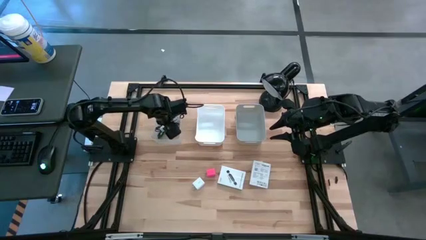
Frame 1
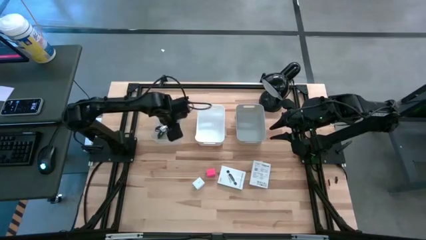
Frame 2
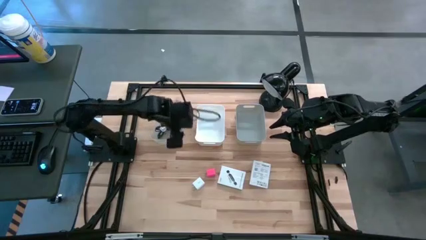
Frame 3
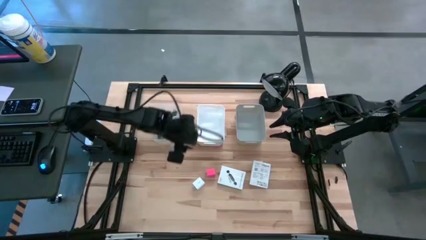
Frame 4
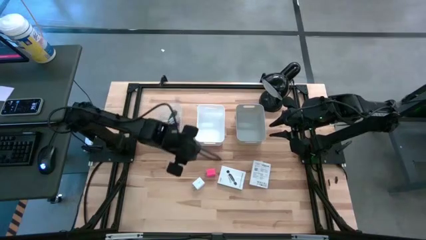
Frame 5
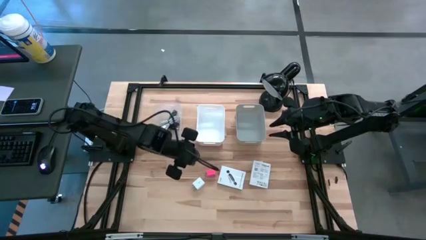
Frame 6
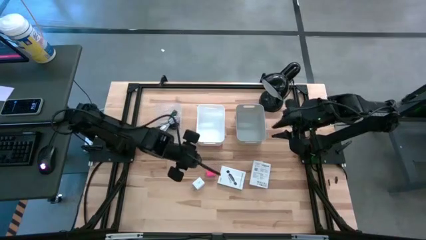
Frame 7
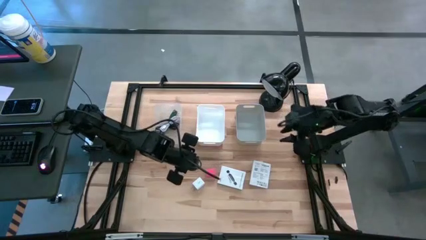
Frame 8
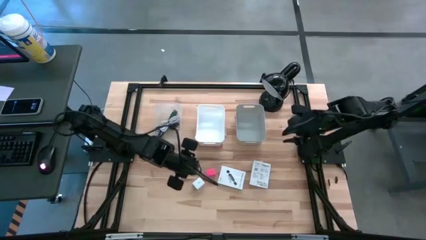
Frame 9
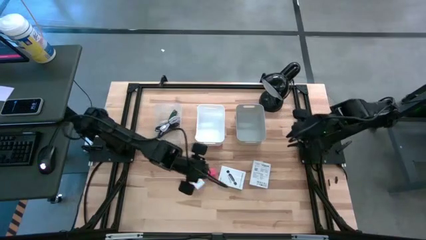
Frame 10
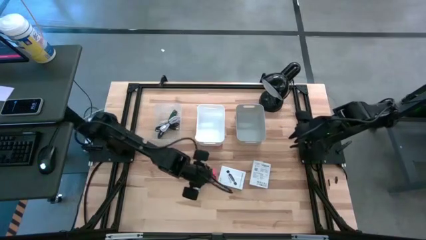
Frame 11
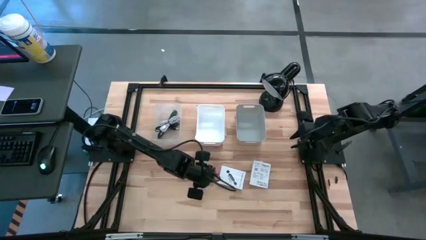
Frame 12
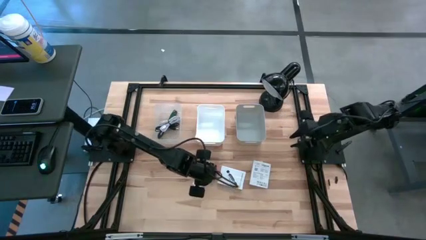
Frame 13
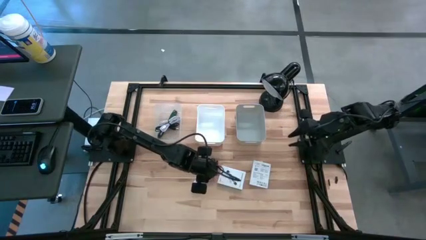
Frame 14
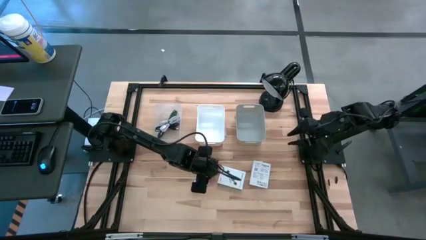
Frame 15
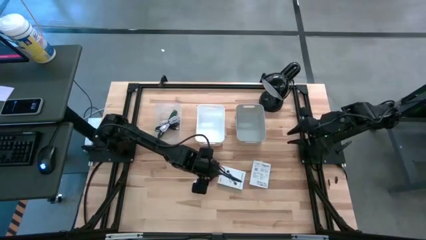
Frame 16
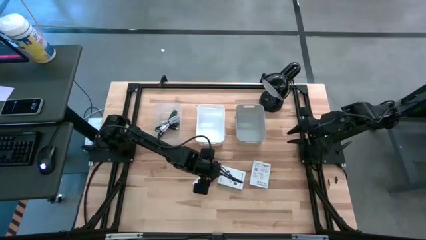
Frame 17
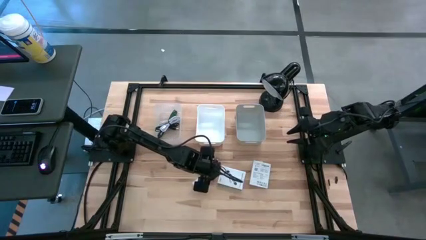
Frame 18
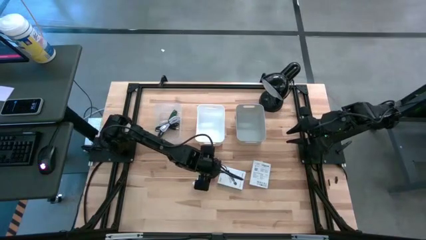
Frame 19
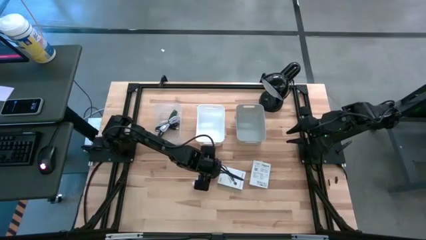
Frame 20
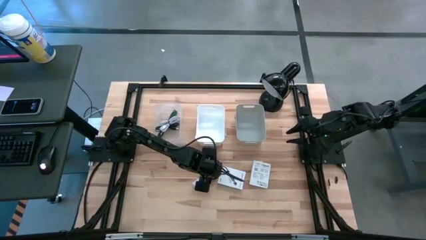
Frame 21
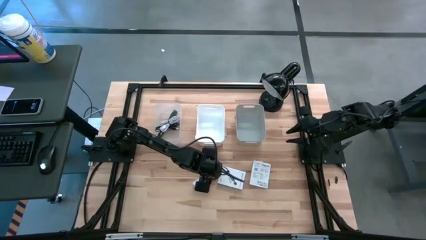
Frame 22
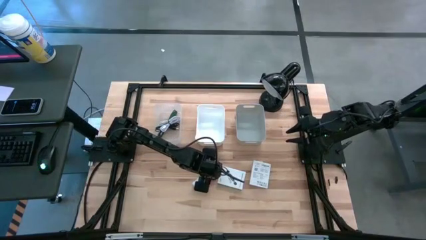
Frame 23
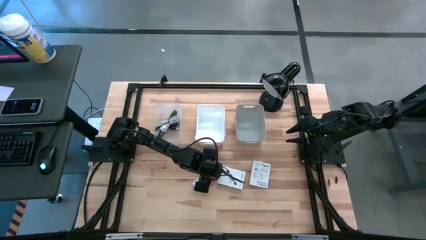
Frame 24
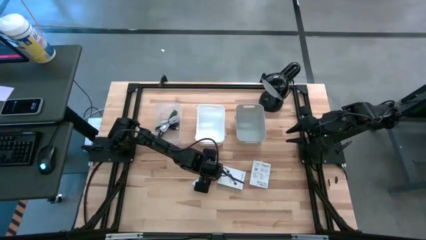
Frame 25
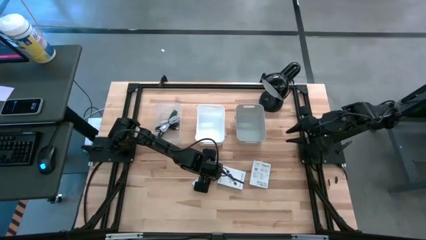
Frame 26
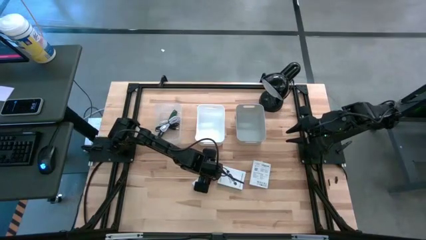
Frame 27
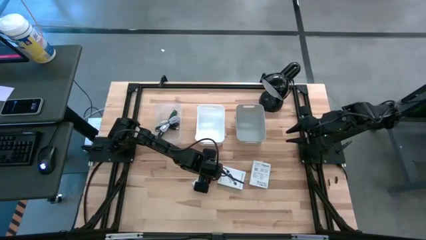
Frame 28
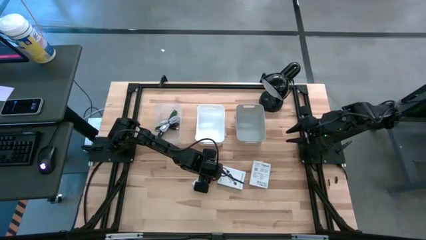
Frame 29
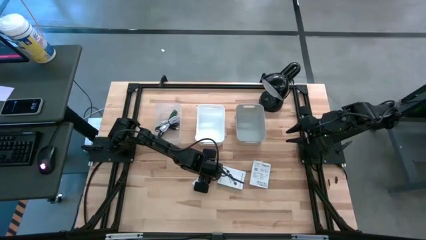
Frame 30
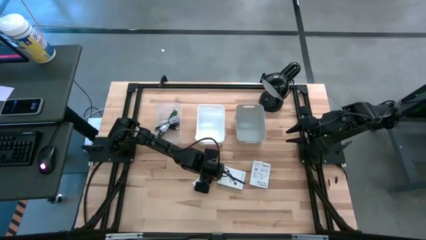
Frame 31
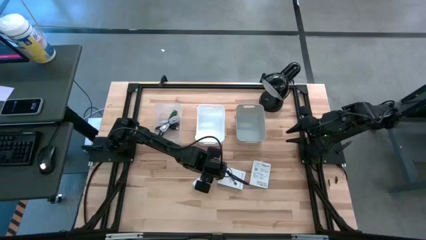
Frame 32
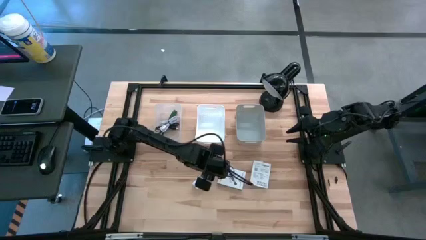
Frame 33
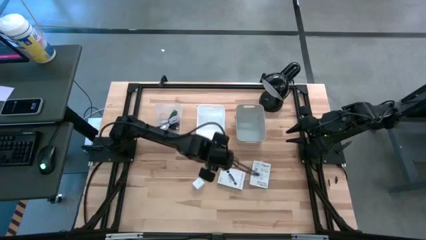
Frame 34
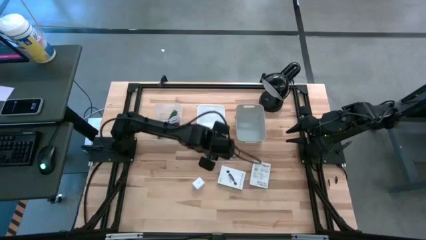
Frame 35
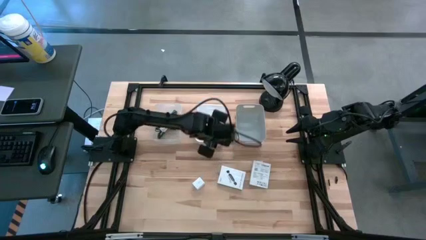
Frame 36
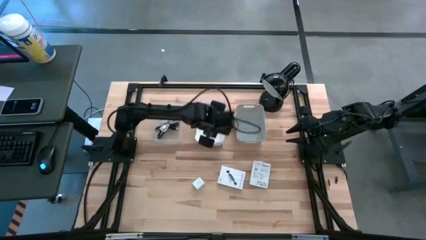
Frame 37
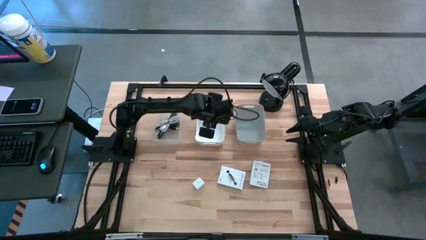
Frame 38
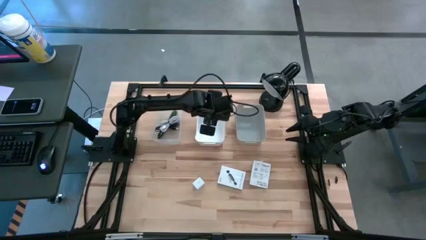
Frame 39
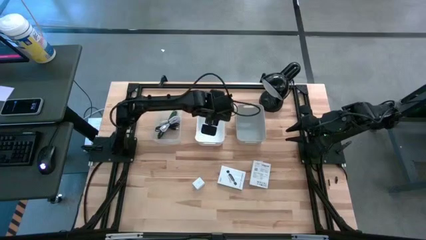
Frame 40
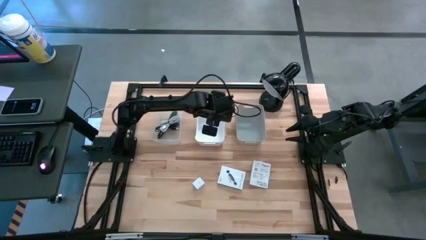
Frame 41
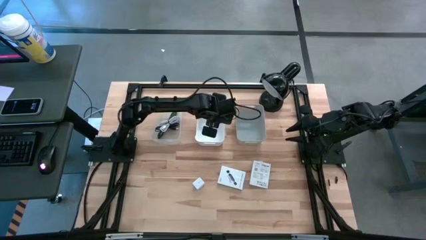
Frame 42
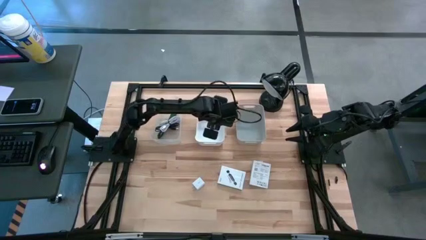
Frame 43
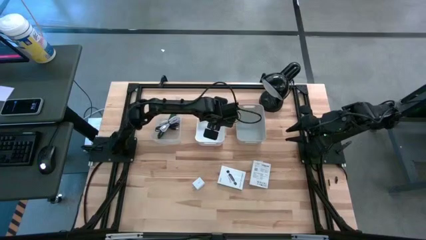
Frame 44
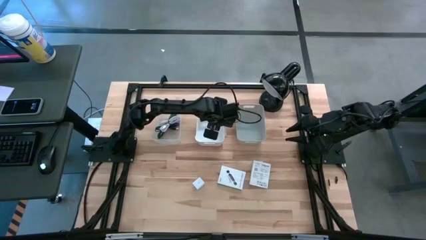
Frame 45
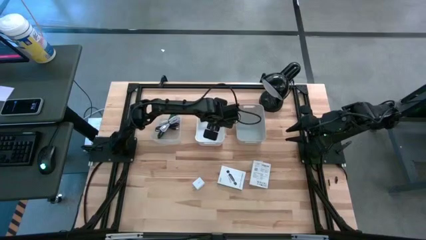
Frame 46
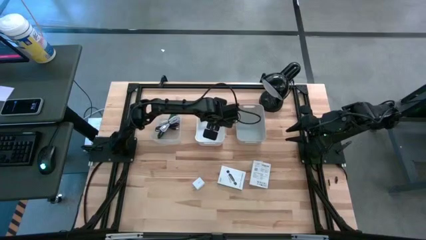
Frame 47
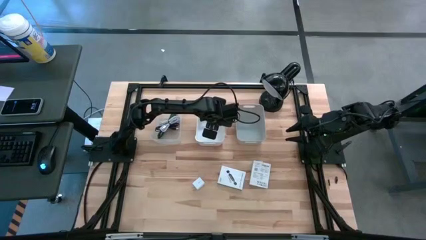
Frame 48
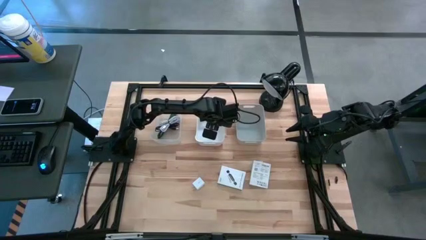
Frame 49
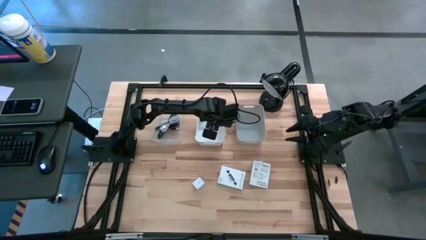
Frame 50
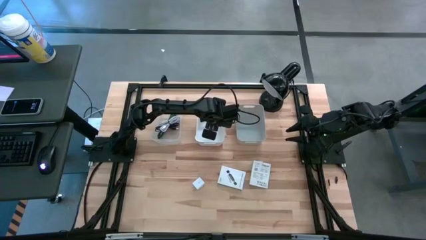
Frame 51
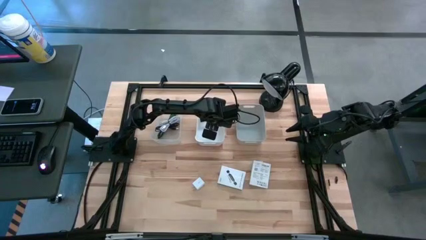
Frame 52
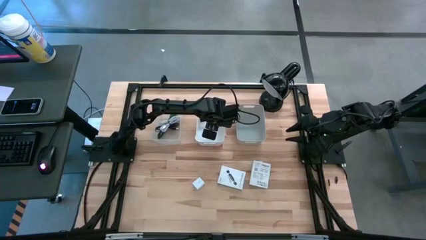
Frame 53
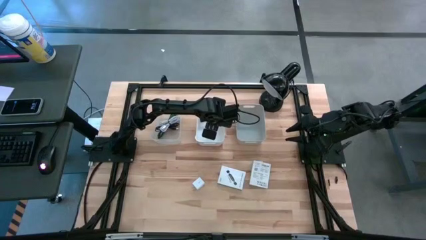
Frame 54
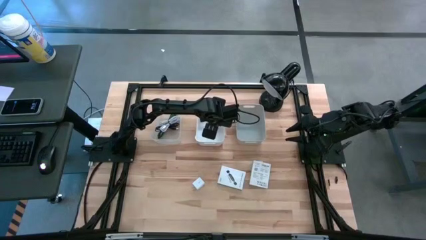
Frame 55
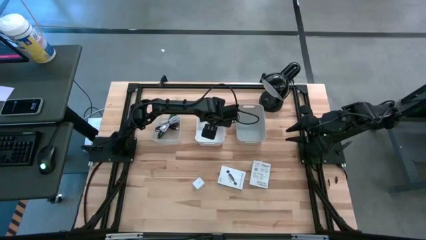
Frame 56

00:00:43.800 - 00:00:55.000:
Task: Pick and place items into bin
Put the pink adapter into the white bin
